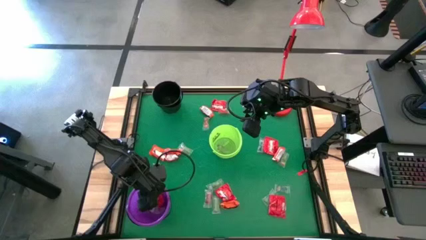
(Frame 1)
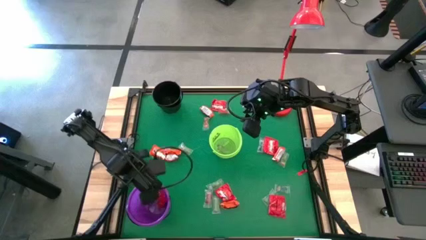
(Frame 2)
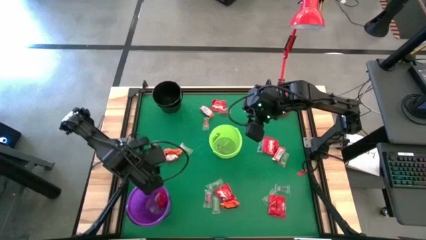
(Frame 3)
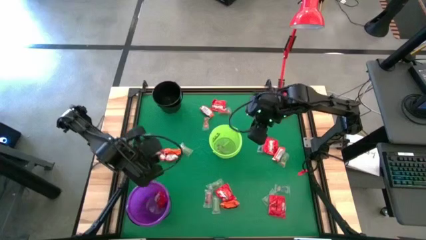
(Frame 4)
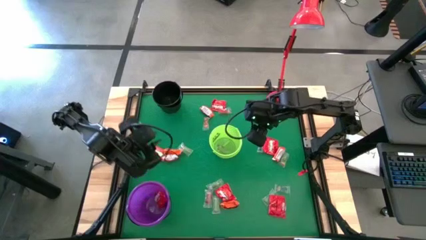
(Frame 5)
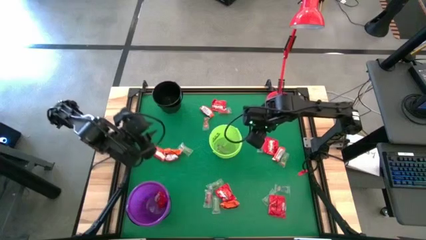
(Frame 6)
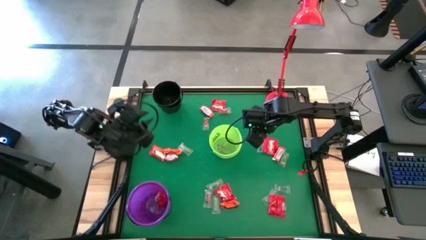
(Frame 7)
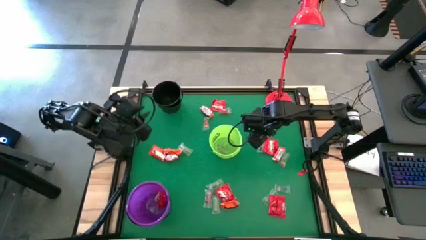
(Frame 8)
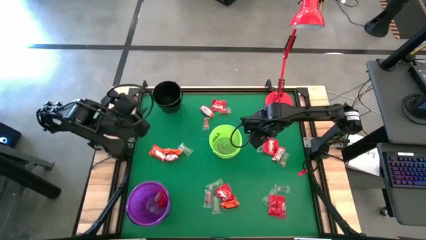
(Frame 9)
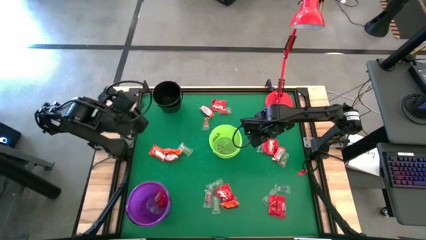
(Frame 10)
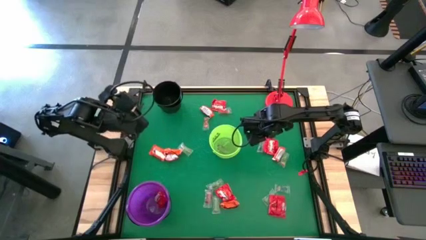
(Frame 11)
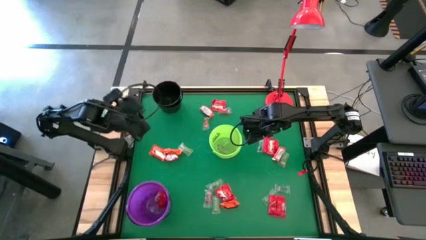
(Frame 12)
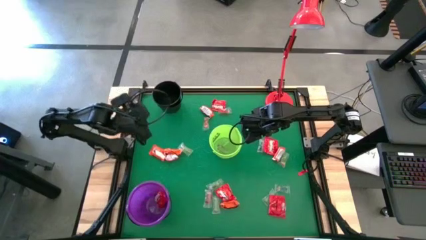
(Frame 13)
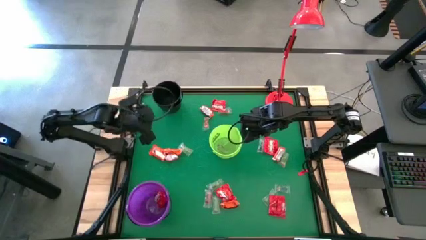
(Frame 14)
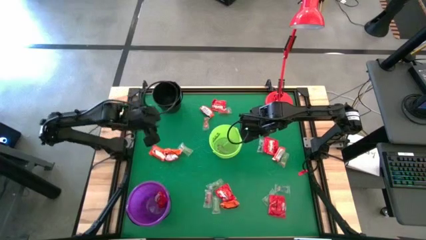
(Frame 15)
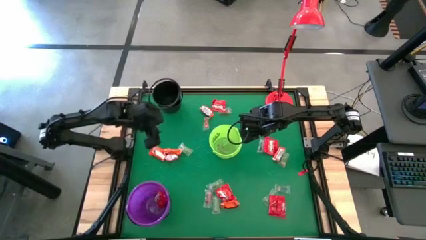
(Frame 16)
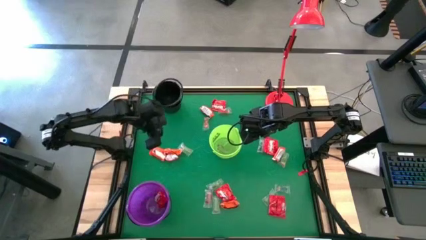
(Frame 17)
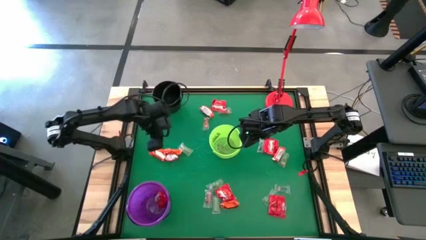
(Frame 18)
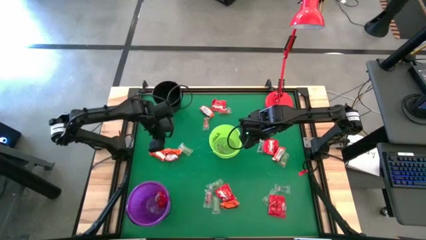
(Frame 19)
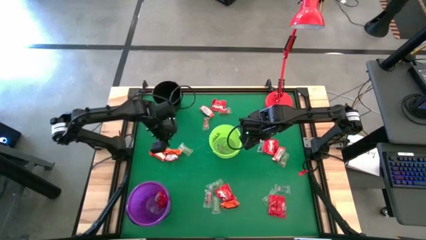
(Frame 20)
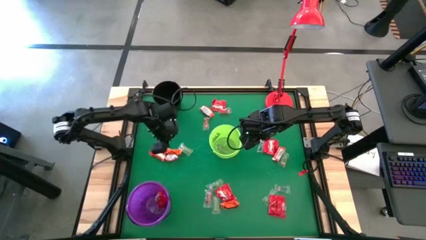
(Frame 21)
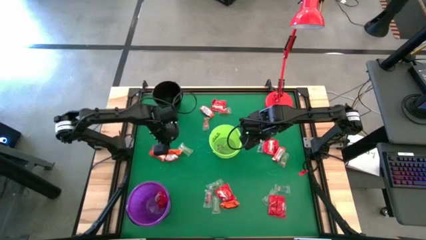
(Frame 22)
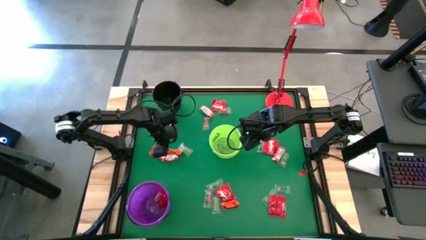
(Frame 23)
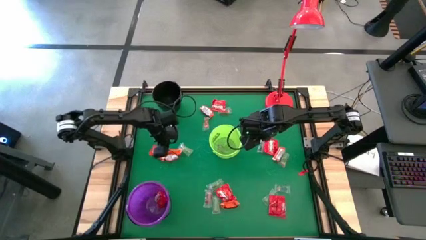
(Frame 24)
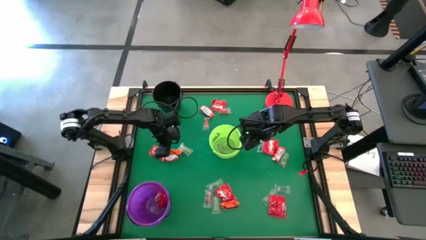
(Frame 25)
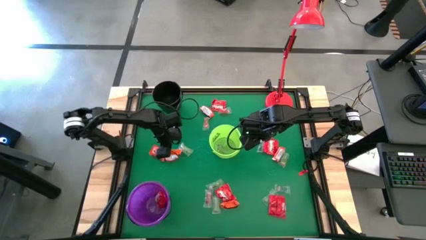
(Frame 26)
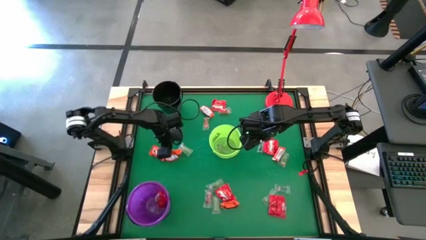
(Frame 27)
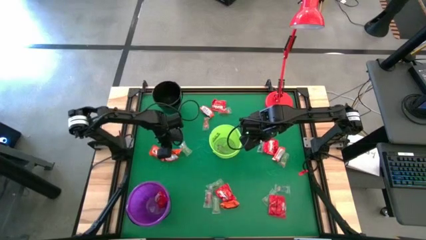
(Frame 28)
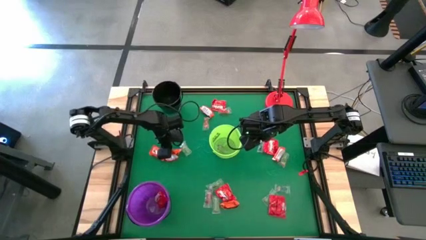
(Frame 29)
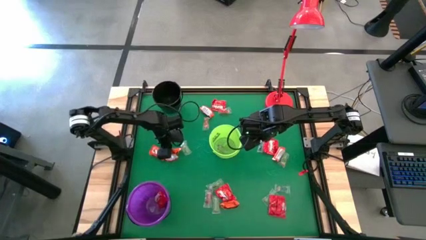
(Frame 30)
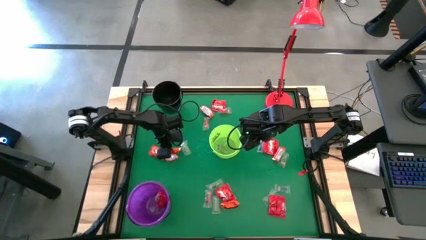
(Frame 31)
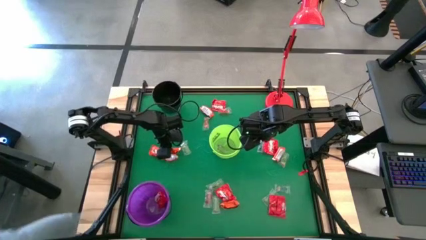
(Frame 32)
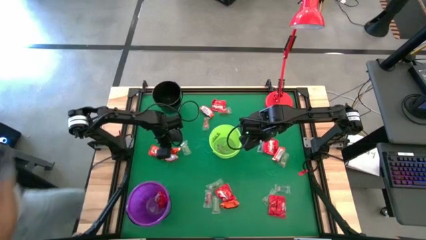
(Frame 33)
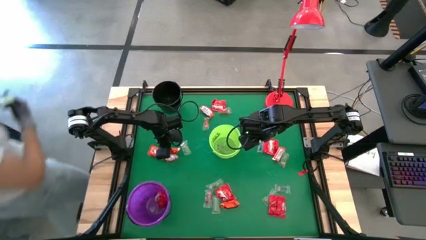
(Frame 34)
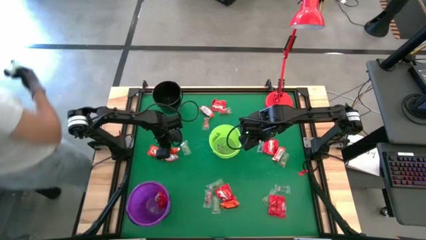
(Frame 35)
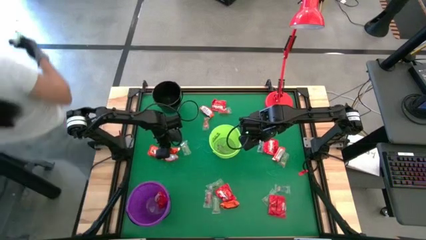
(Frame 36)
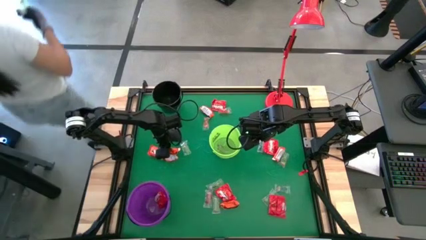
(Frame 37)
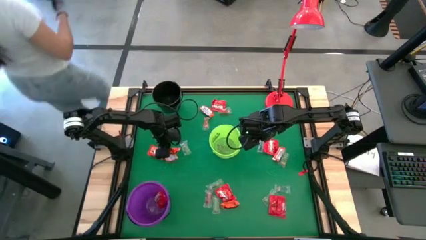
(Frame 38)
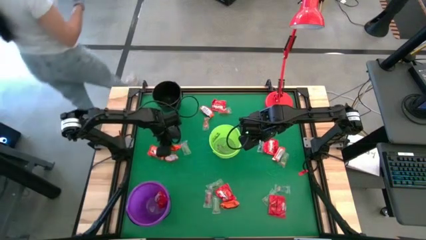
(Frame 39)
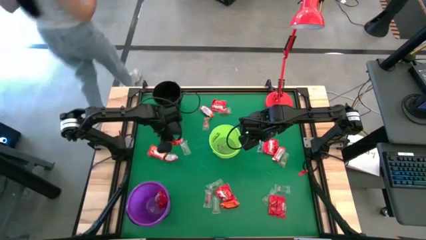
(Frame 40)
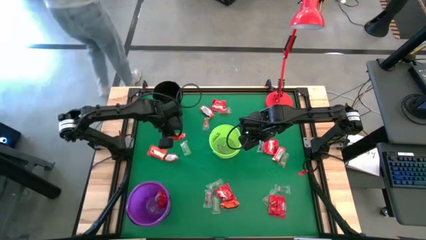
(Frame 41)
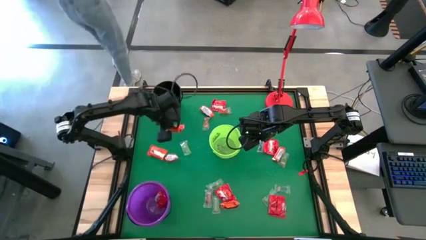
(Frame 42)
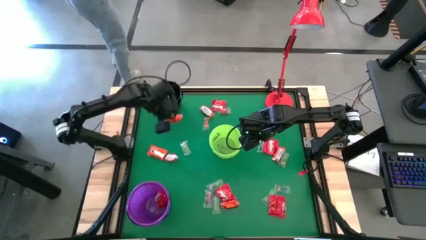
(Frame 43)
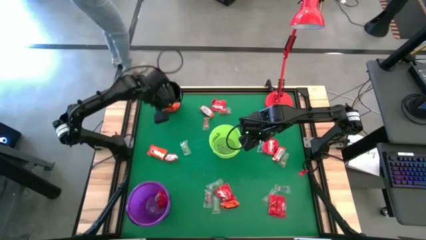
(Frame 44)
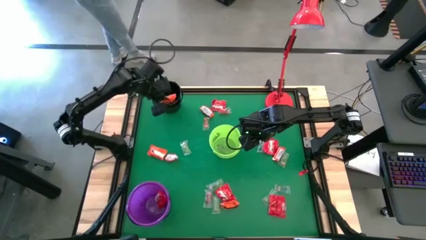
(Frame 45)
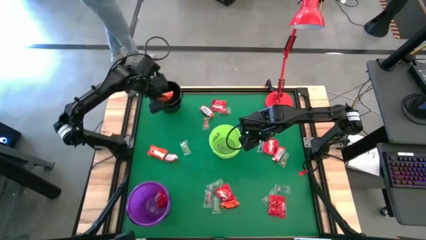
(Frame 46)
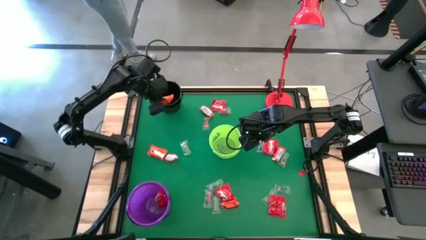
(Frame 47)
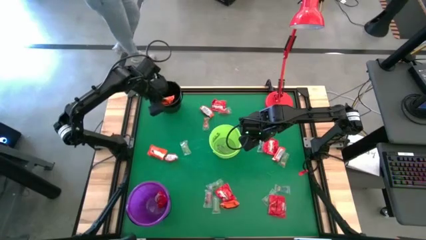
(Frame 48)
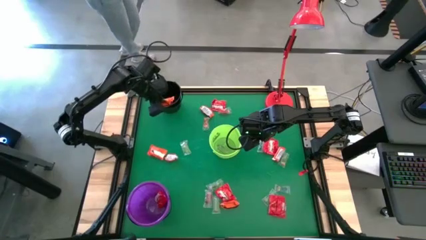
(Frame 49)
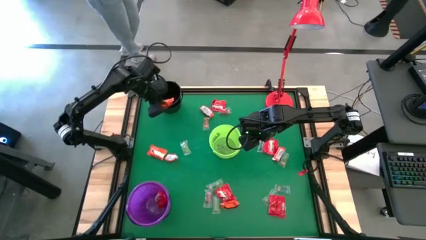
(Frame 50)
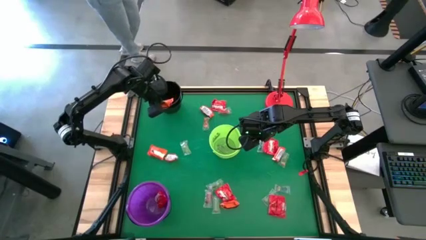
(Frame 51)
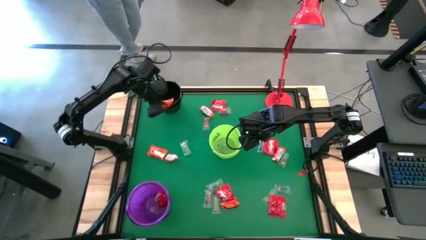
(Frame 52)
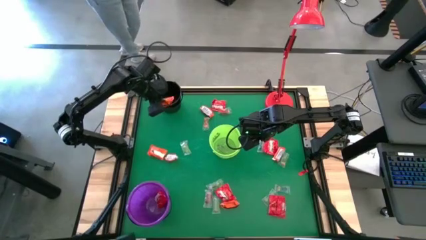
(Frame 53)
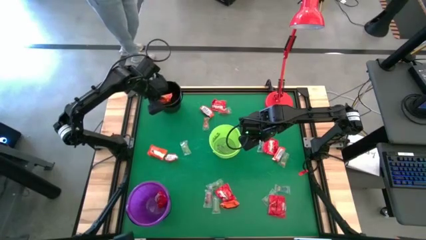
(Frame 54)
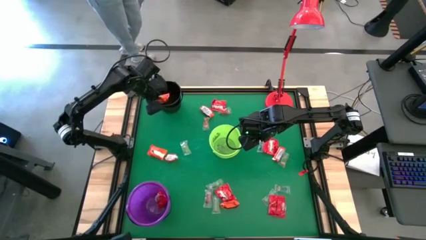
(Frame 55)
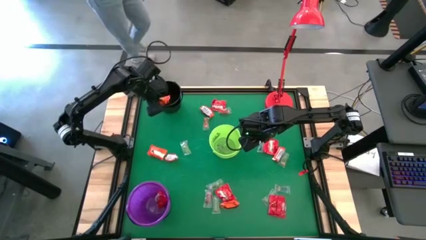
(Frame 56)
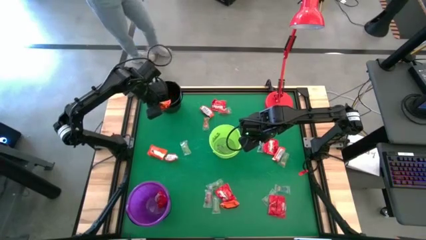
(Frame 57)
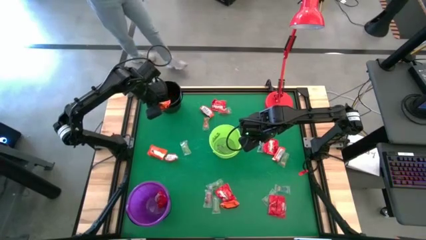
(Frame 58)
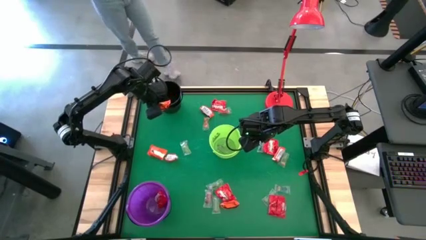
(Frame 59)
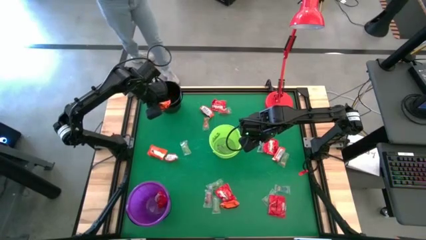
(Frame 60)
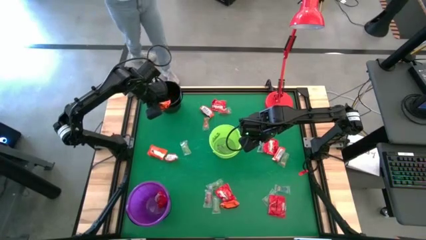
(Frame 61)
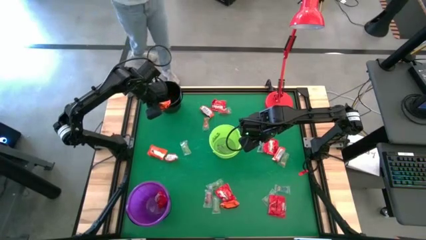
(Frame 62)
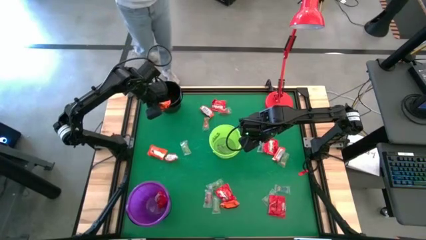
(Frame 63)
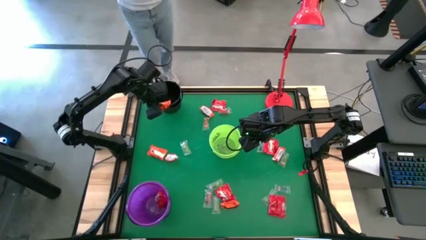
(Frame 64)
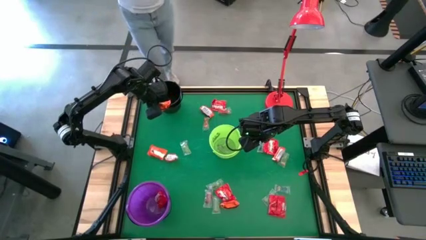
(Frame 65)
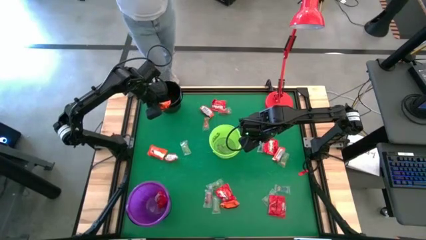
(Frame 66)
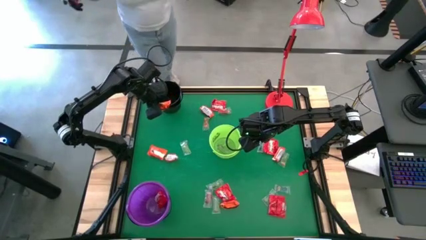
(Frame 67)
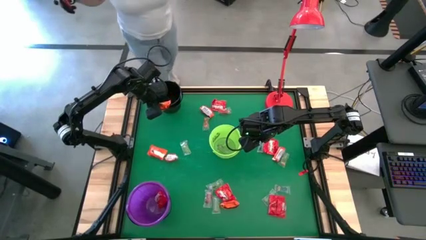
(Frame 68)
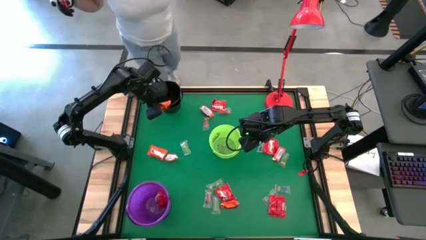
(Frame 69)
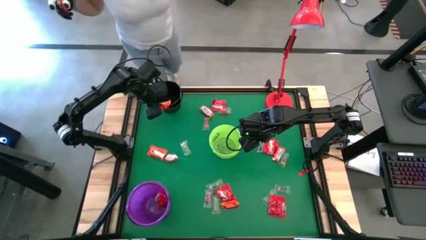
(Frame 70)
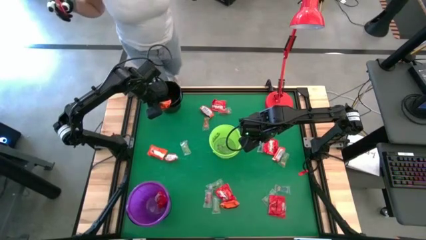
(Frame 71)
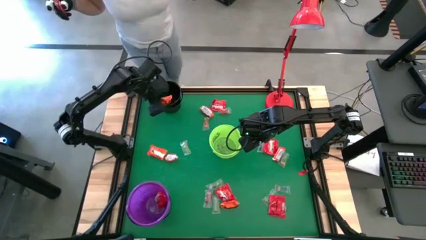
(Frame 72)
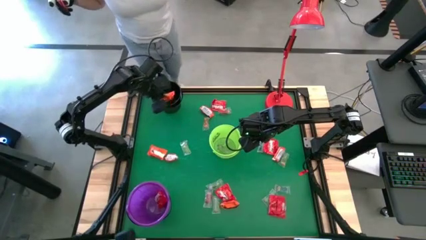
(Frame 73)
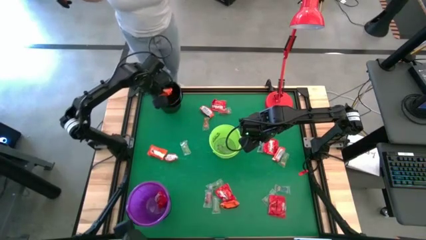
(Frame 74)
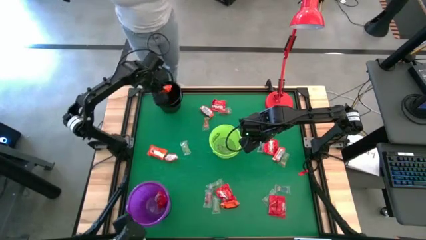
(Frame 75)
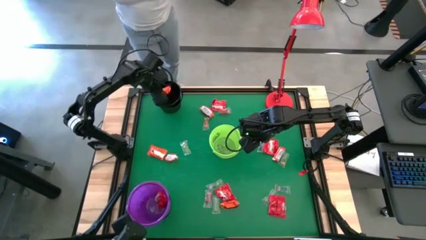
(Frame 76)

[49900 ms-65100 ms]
Task: Sort candy
Put the orange chocolate into the black bucket

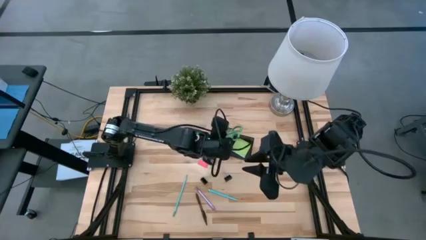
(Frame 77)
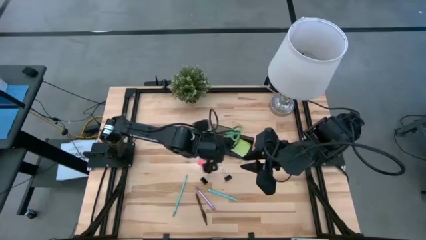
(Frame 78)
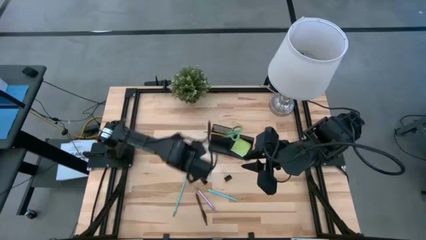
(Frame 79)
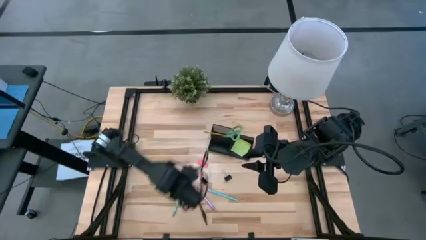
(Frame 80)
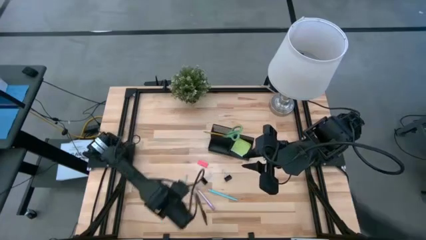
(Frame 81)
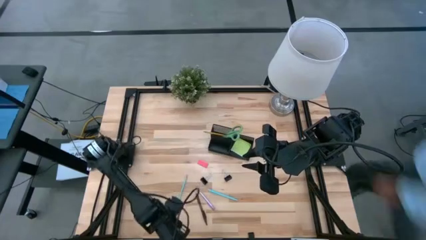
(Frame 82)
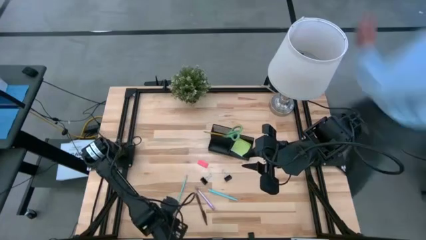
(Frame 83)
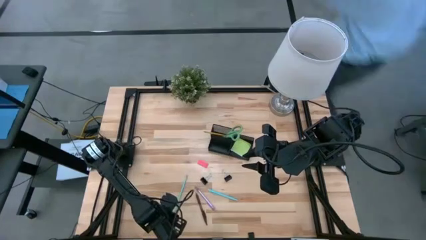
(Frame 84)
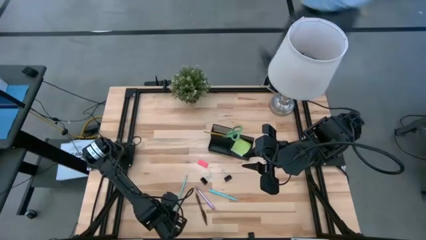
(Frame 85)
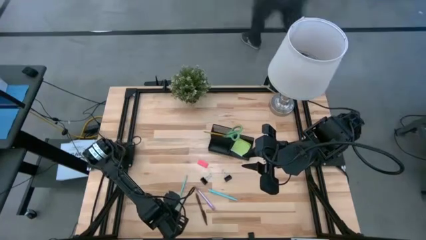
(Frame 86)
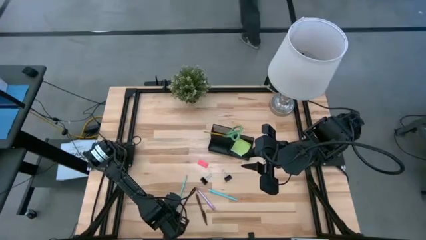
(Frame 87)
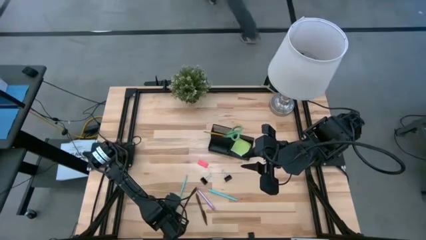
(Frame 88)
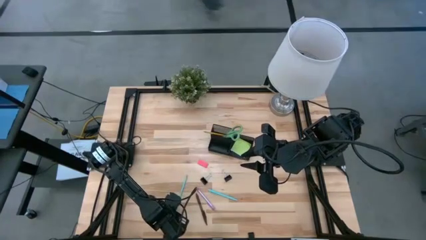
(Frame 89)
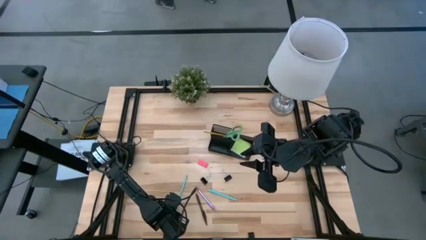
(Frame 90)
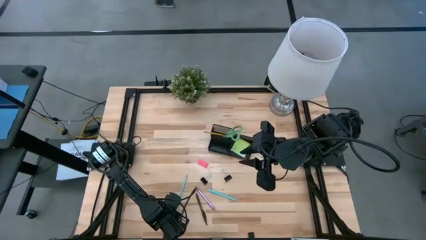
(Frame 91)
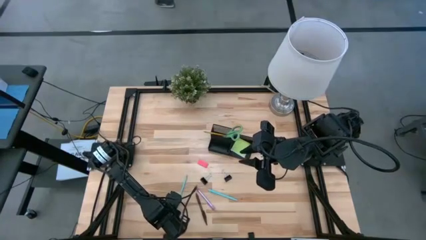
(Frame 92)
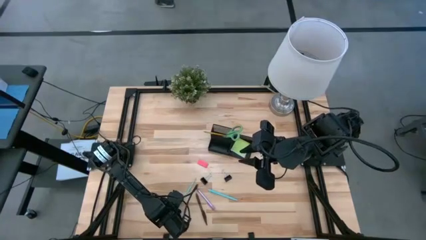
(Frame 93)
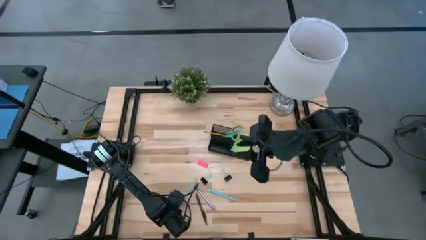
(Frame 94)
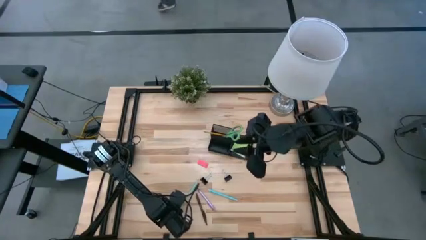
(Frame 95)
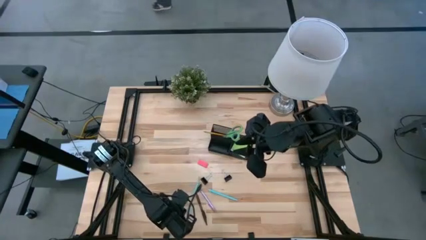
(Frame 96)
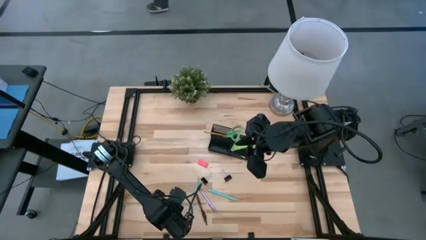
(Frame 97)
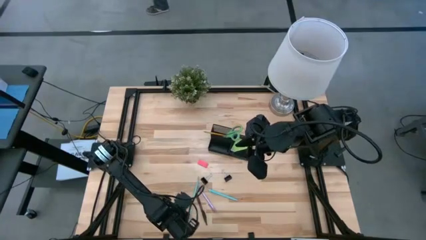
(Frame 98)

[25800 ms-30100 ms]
Task: Pick and place office supplies into organizer
Put the blue pencil on the black desk organizer
